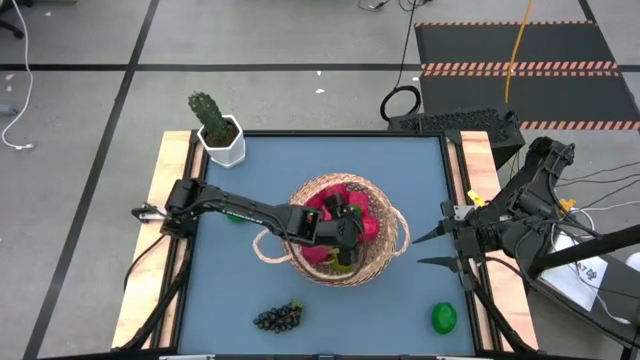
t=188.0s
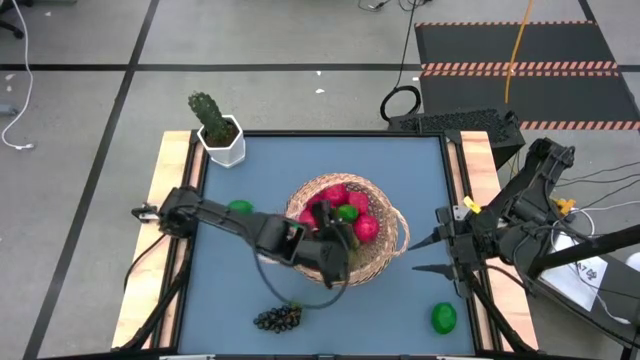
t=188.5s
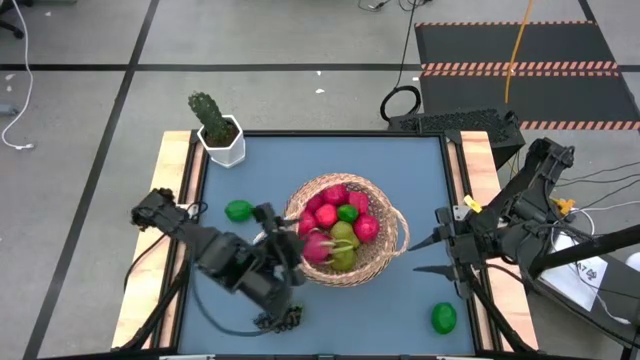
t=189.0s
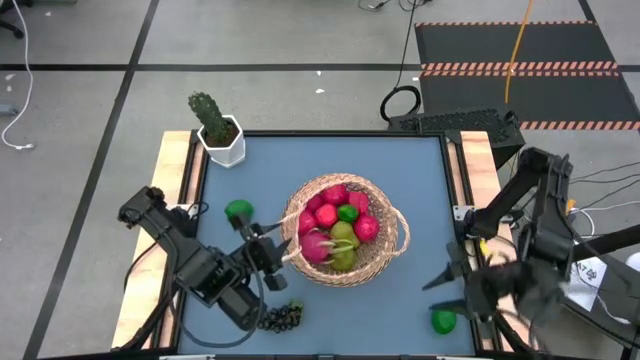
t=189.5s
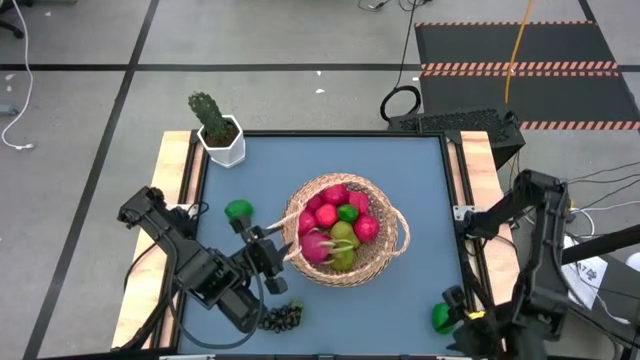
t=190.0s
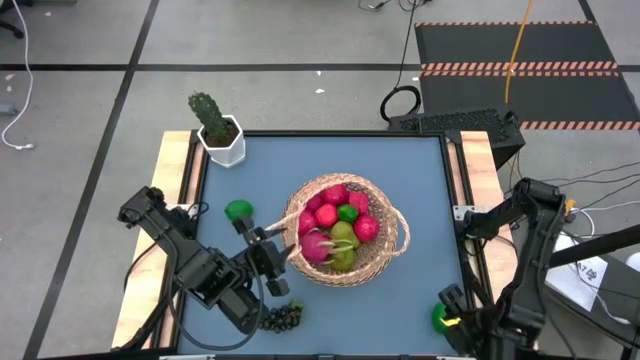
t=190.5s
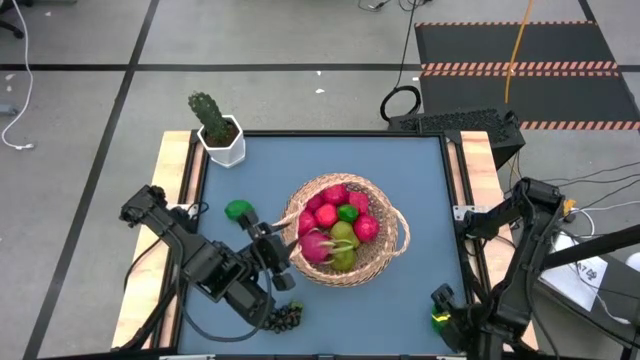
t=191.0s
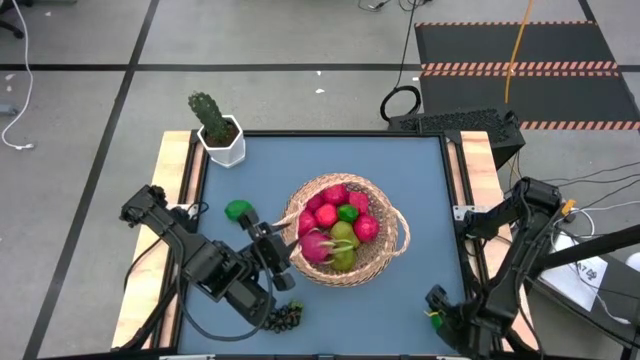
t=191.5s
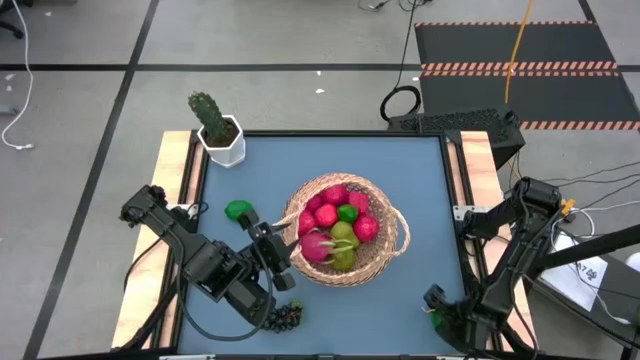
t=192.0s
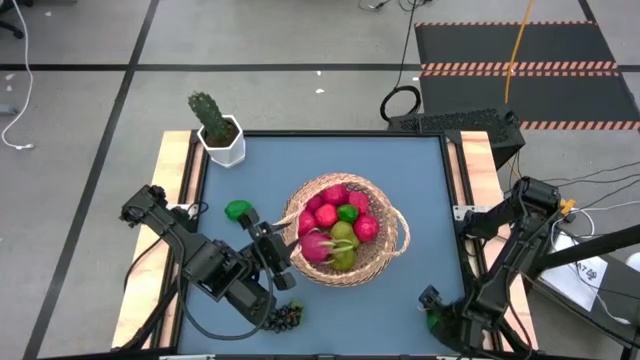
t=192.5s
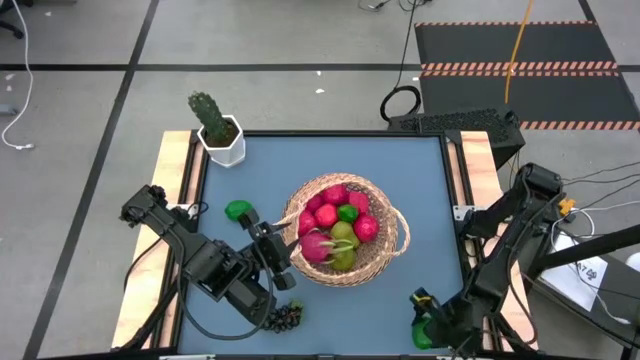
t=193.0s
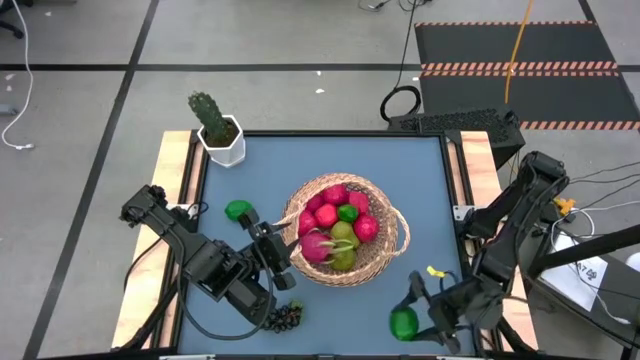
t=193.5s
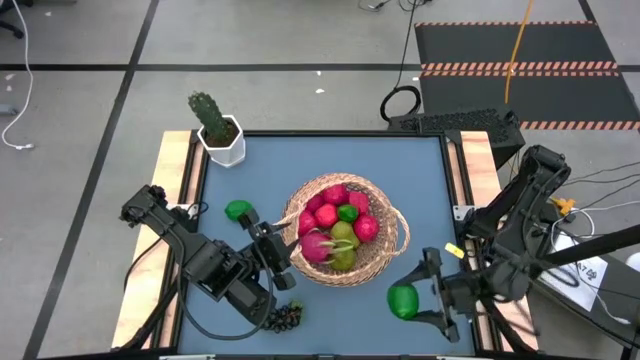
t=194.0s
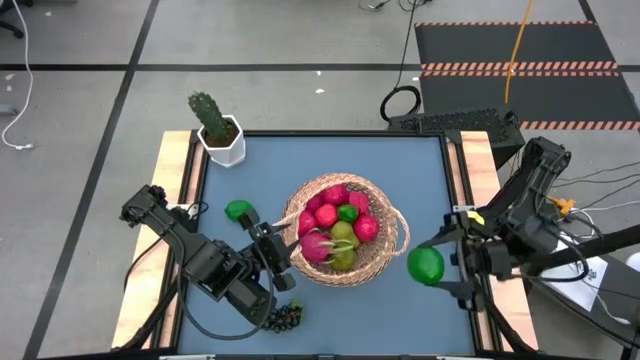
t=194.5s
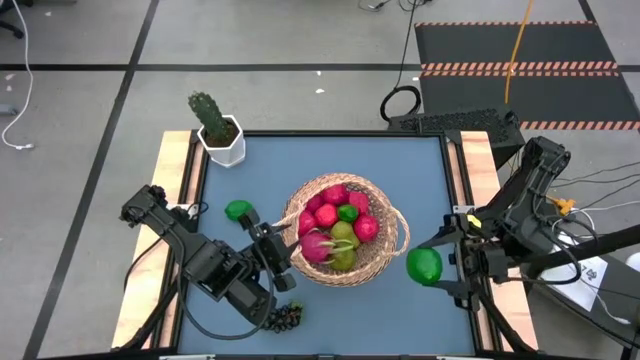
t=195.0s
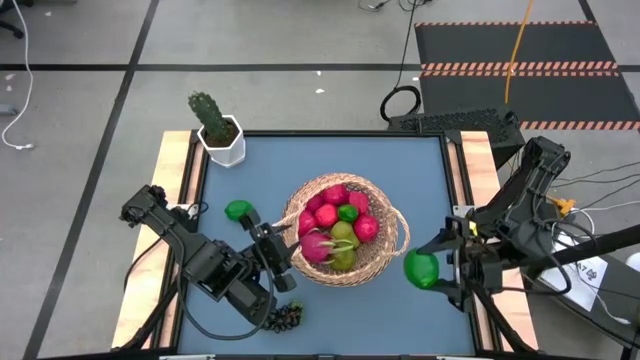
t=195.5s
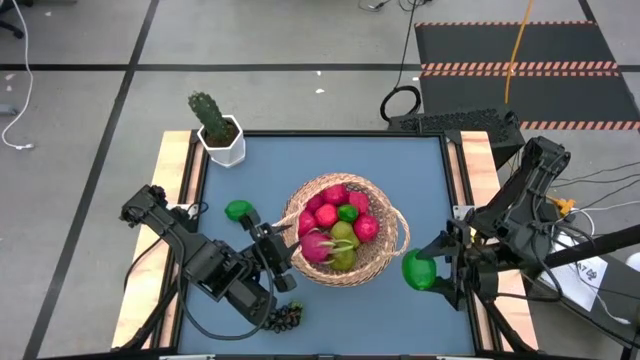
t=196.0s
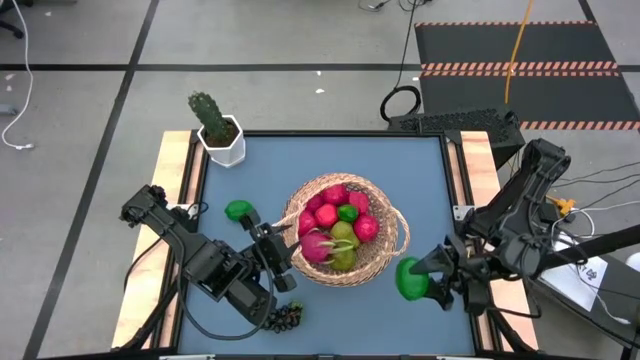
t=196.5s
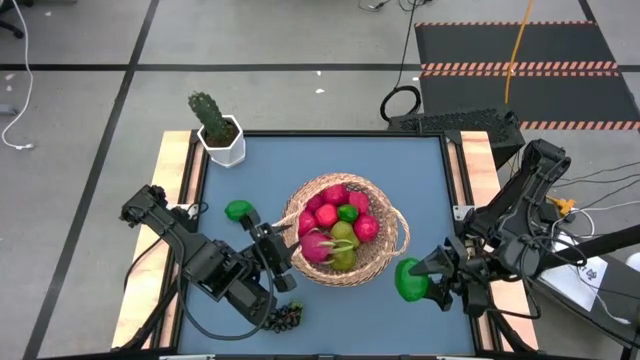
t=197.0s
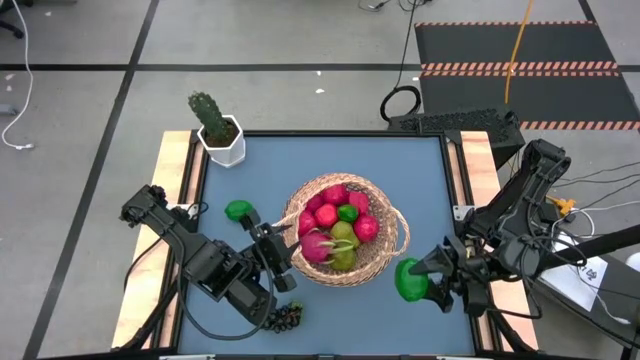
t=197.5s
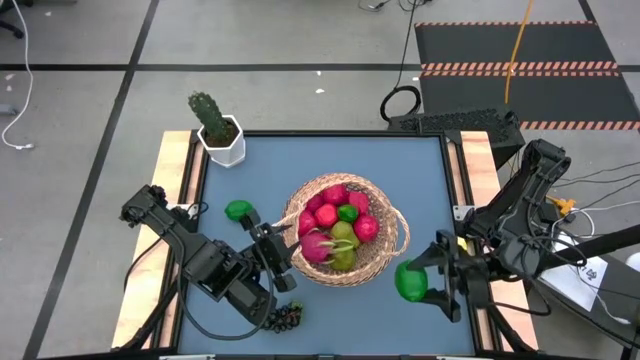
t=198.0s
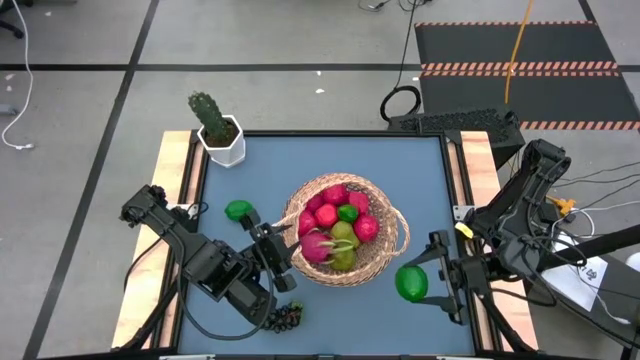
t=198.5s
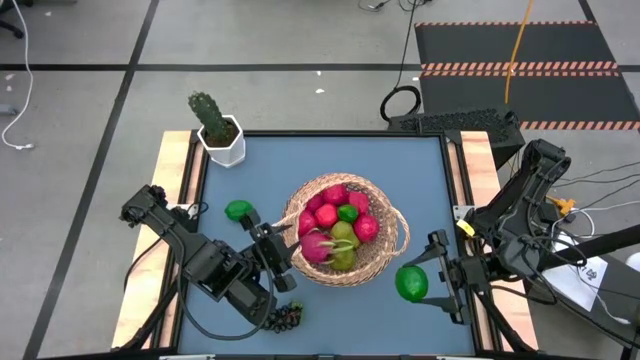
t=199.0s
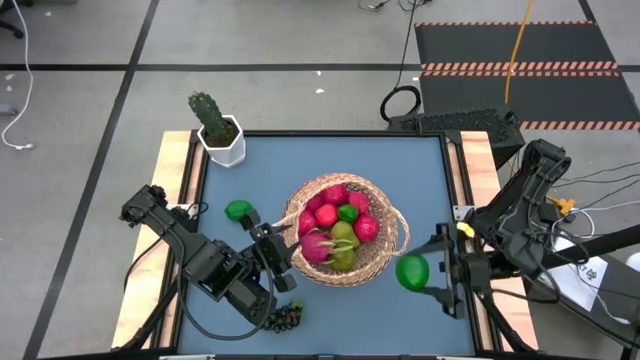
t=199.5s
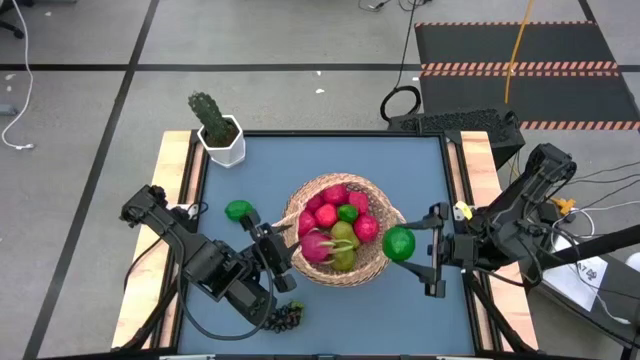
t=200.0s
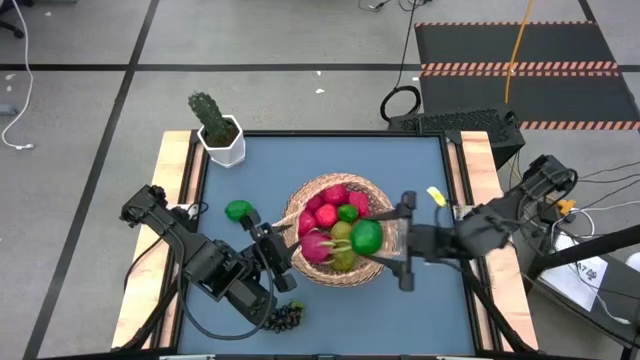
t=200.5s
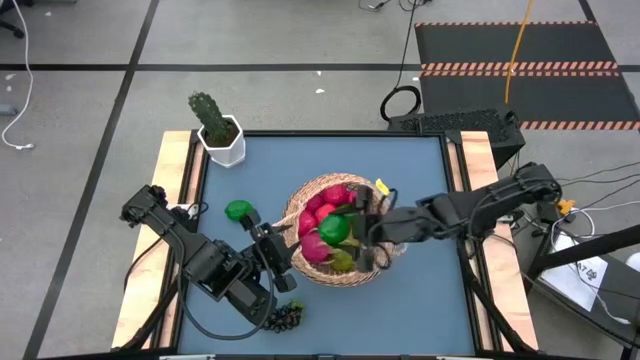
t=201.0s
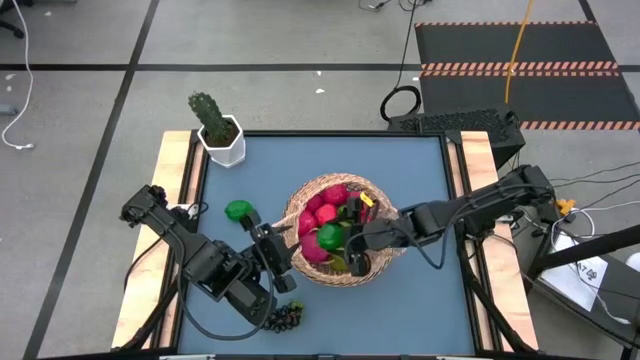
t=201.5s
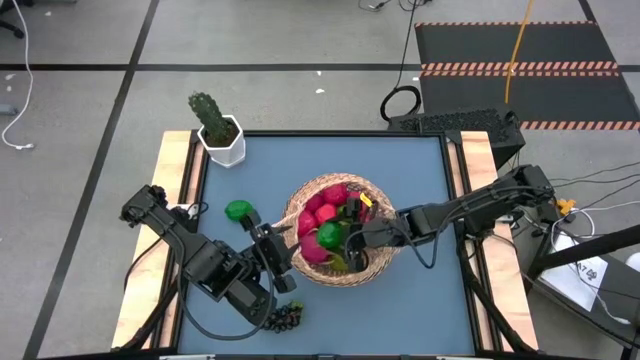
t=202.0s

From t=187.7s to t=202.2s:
Task: Build produce basket
Put the bottom dark green lime into the brown basket

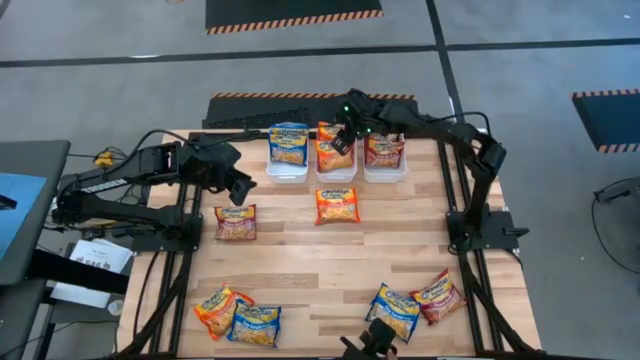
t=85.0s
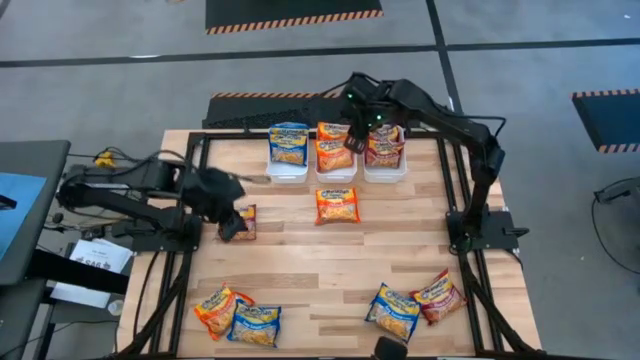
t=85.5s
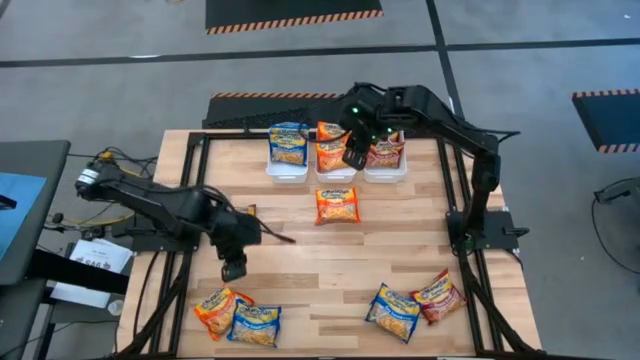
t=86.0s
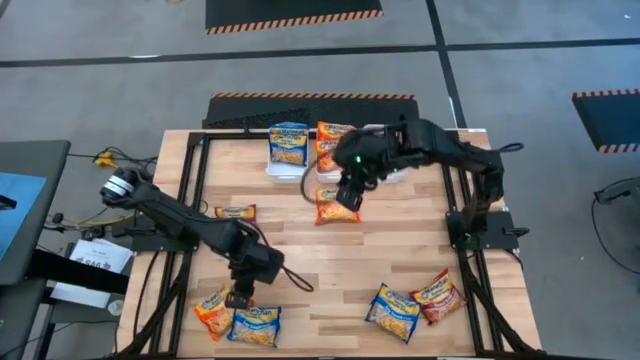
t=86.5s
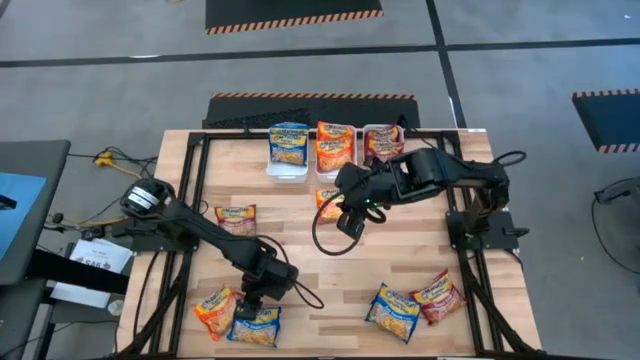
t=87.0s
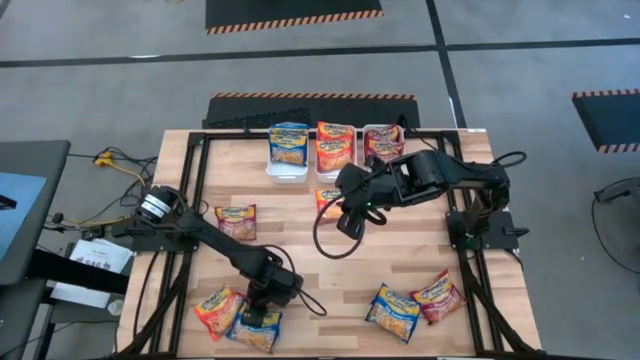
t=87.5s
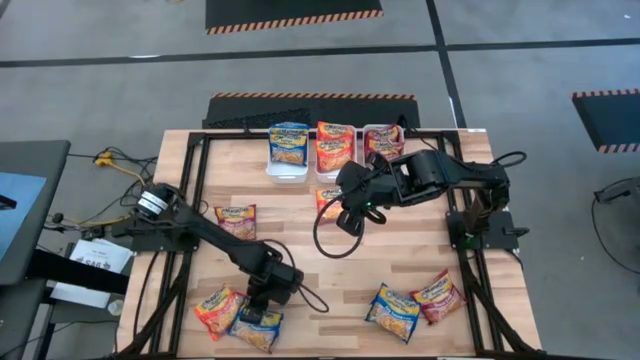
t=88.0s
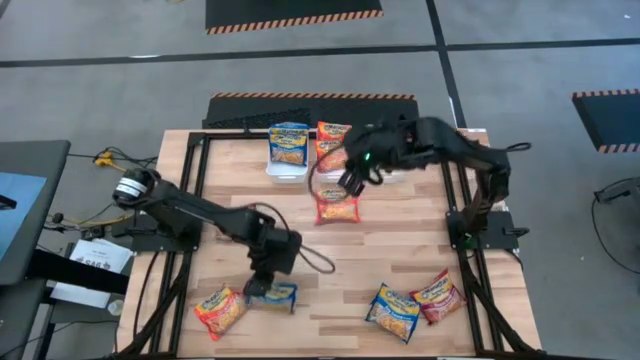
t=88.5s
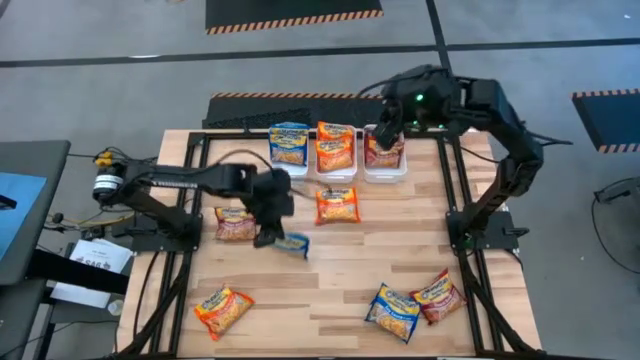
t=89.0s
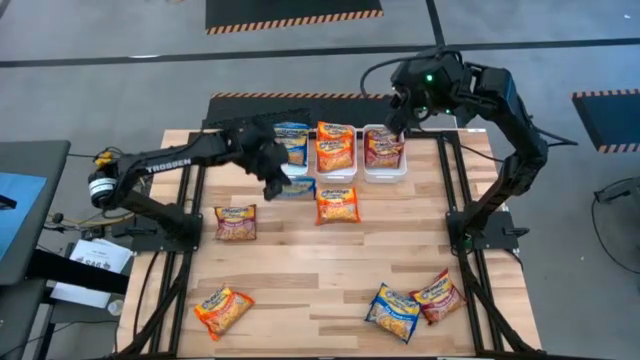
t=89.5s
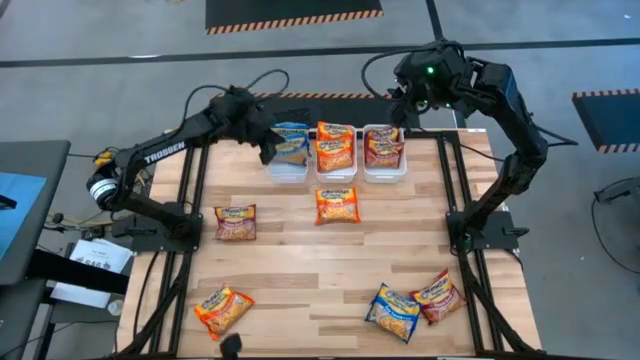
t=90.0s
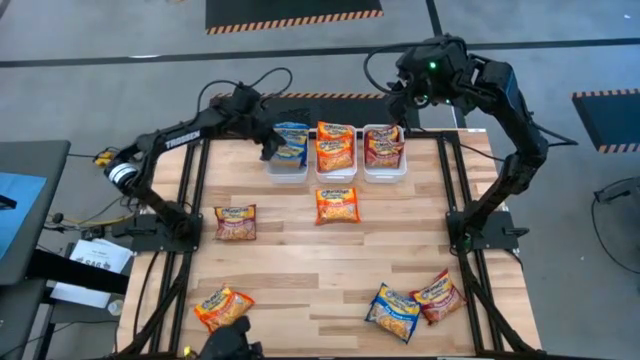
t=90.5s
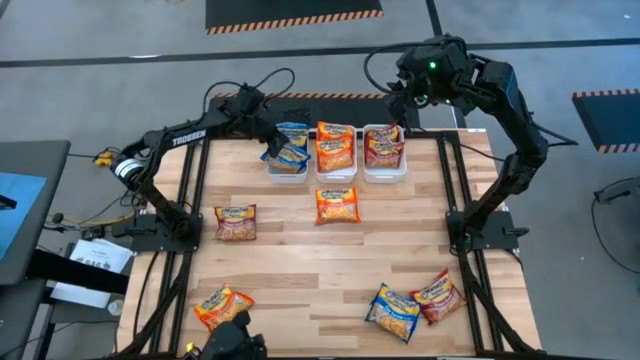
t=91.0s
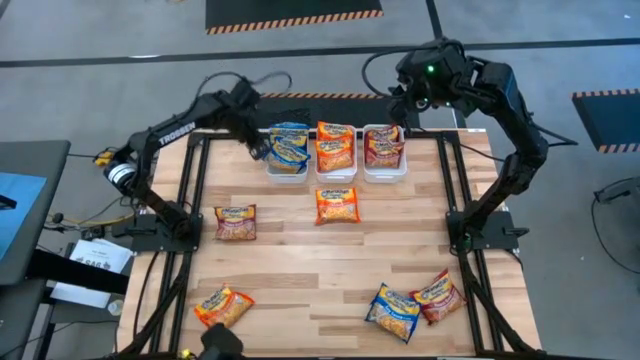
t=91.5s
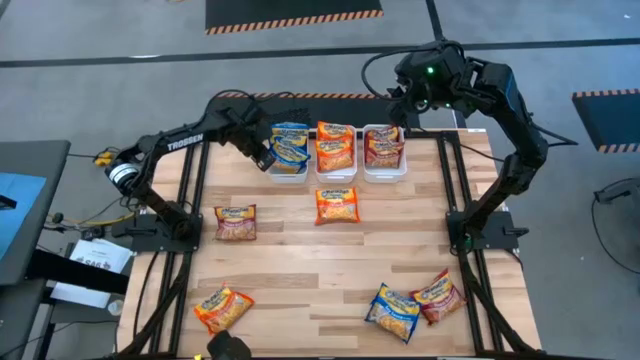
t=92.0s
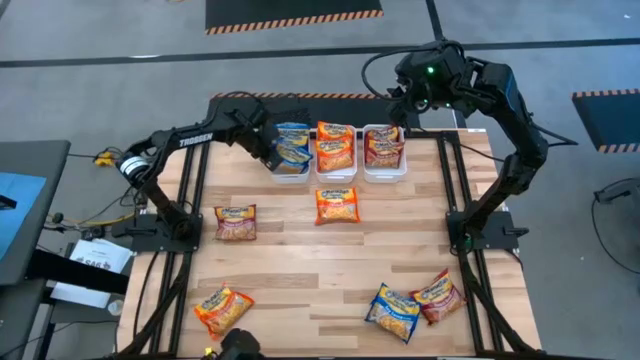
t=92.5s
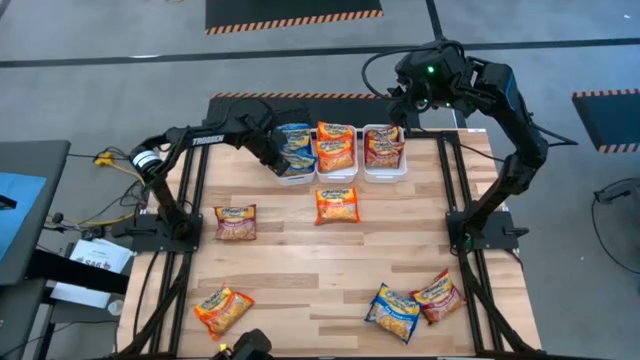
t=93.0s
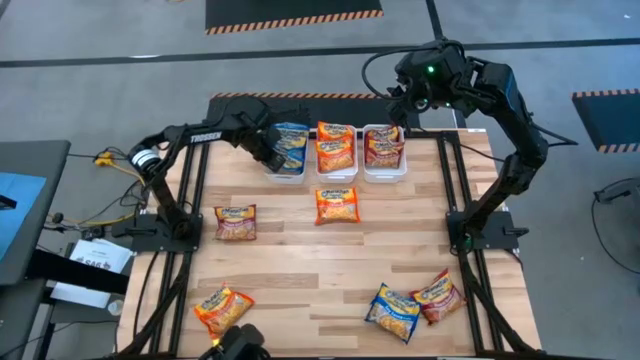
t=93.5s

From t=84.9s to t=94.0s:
Task: Sort Maruchan noodles
Put the blue noodle pack into the left white bin
